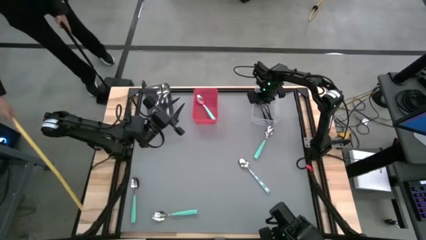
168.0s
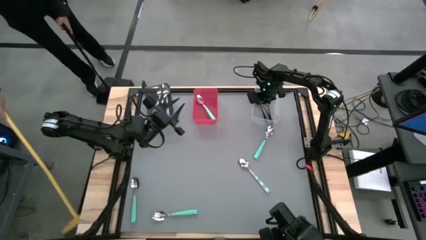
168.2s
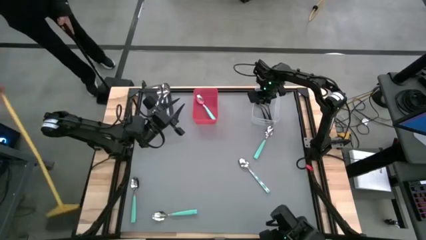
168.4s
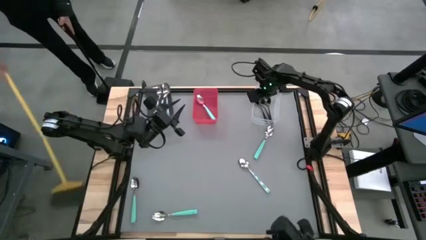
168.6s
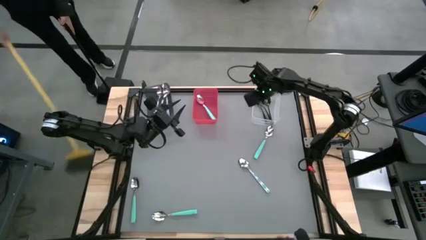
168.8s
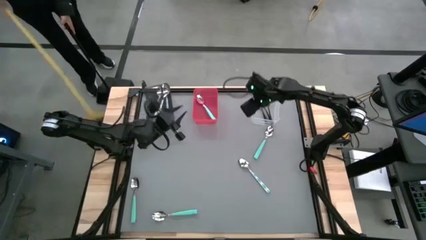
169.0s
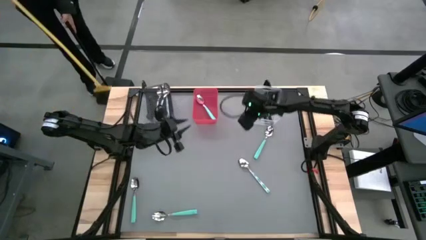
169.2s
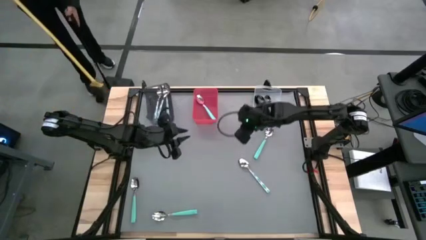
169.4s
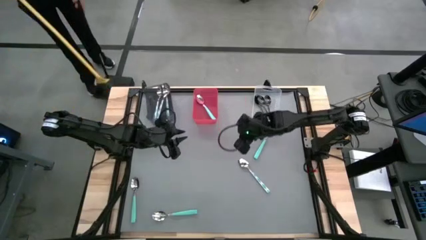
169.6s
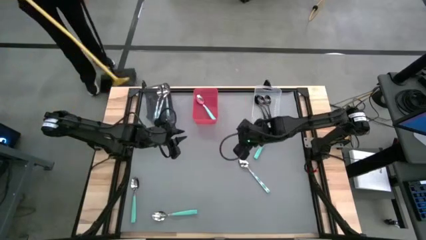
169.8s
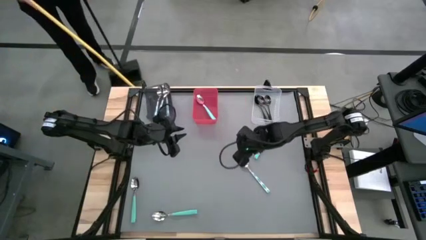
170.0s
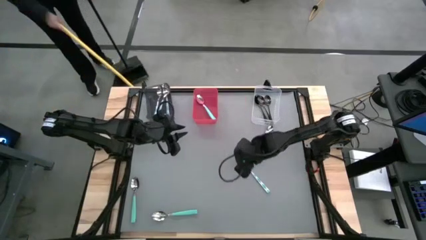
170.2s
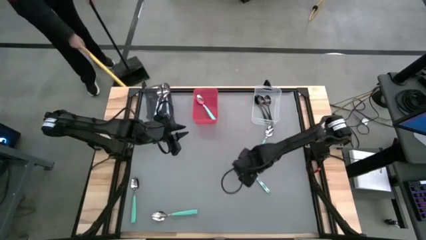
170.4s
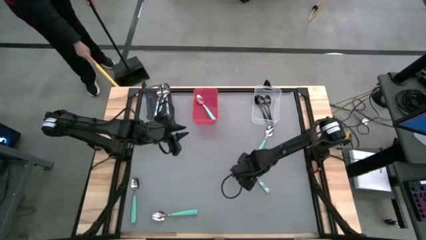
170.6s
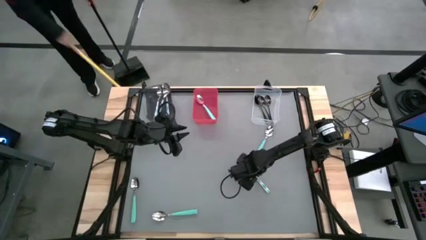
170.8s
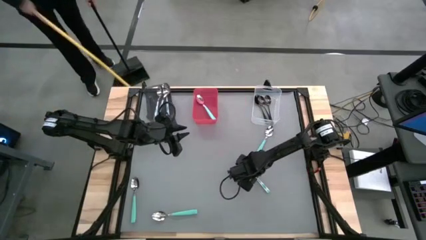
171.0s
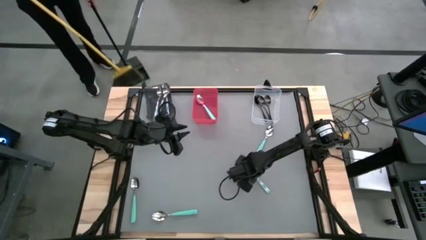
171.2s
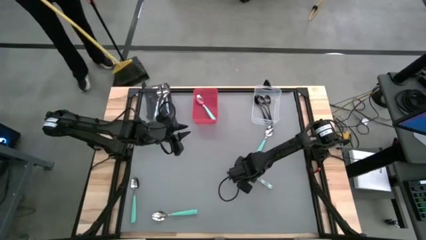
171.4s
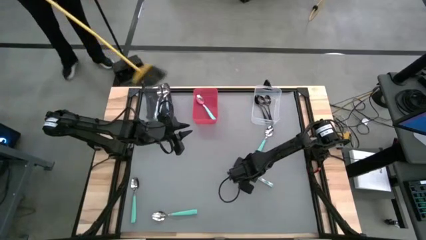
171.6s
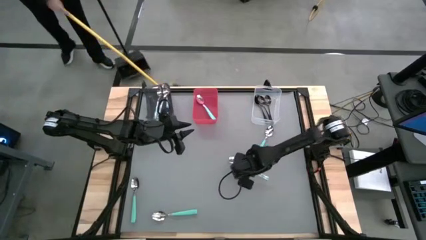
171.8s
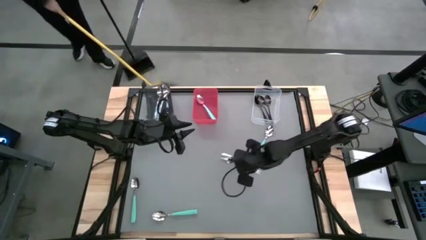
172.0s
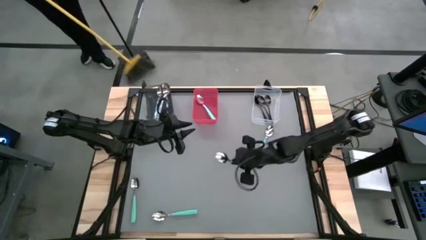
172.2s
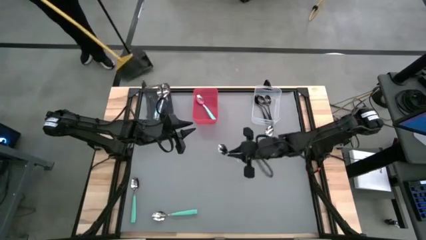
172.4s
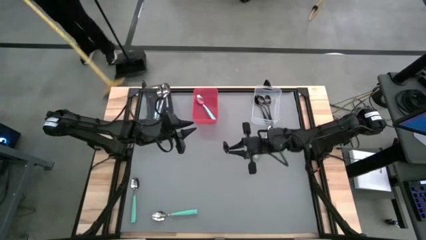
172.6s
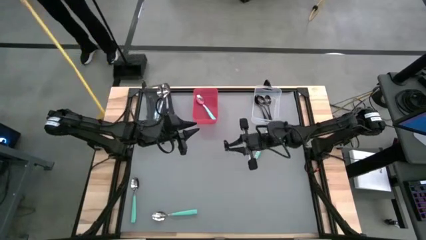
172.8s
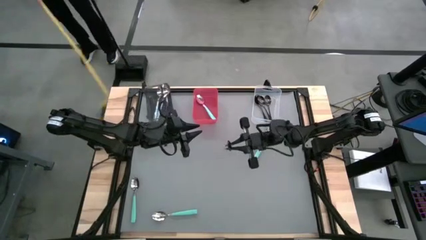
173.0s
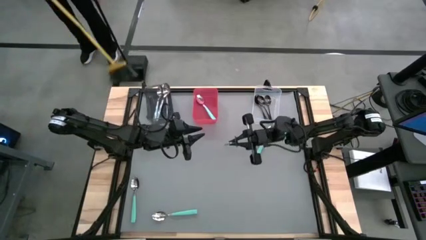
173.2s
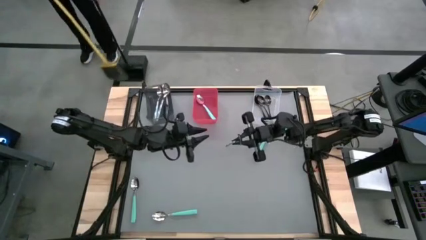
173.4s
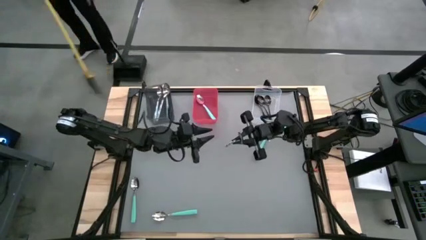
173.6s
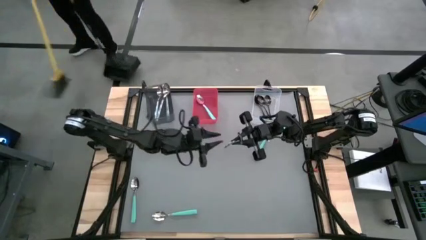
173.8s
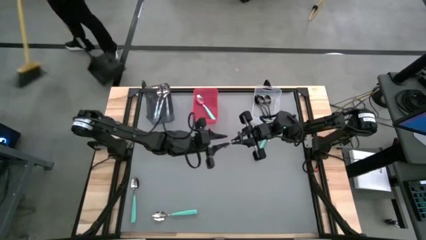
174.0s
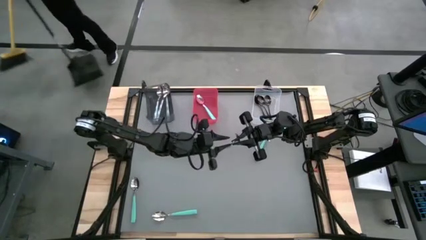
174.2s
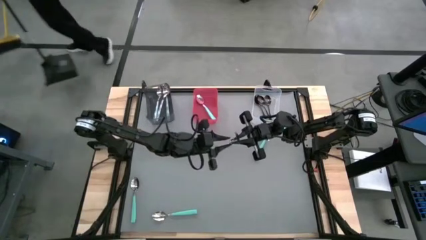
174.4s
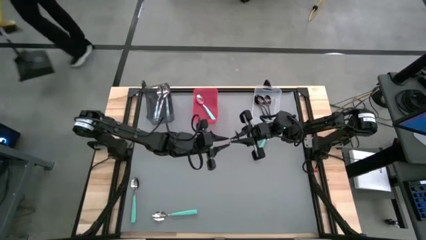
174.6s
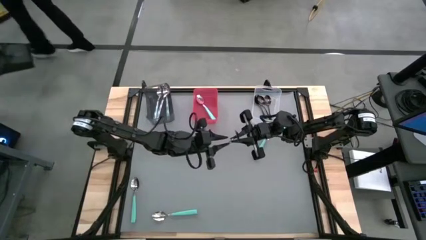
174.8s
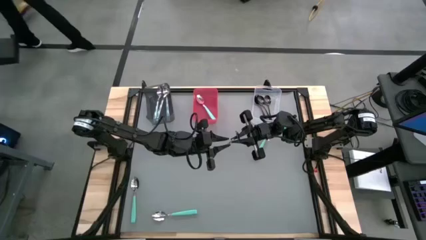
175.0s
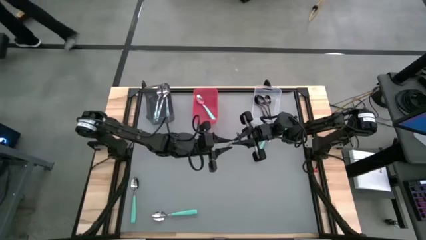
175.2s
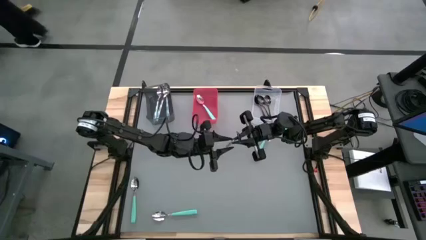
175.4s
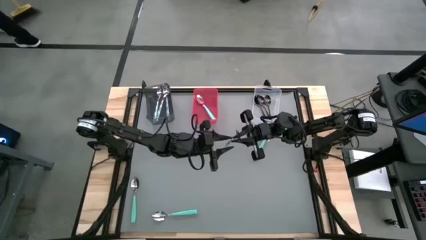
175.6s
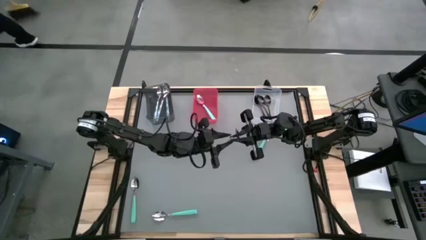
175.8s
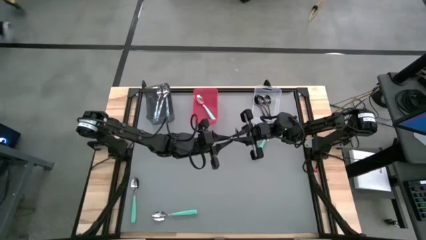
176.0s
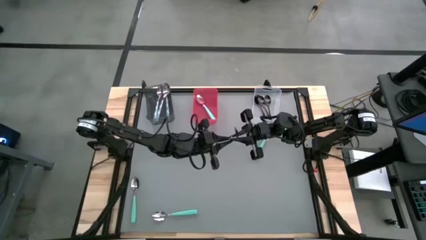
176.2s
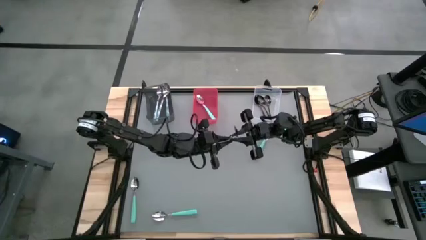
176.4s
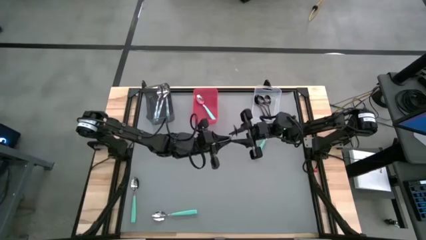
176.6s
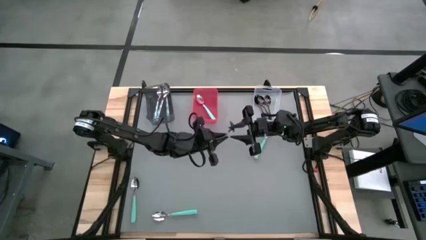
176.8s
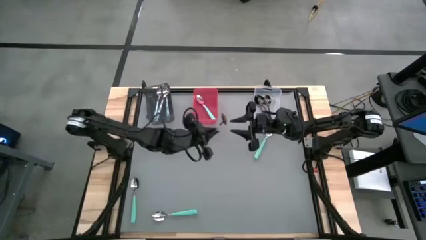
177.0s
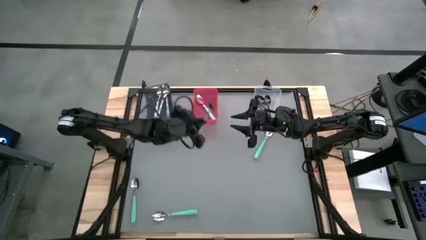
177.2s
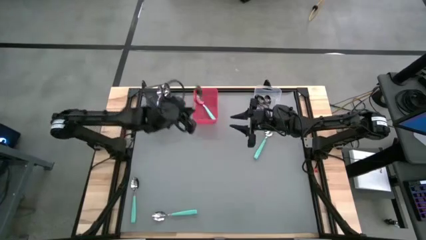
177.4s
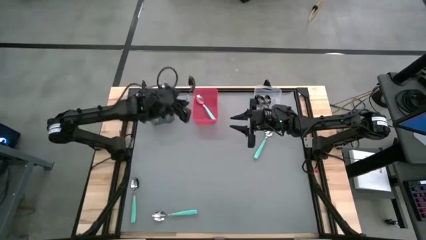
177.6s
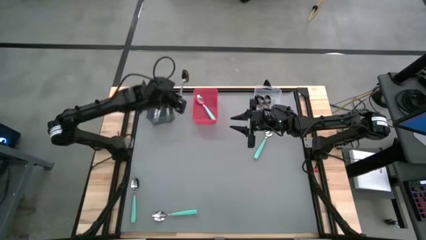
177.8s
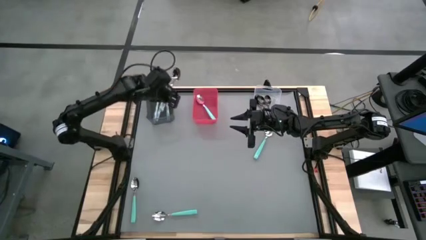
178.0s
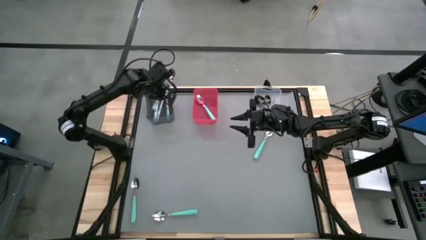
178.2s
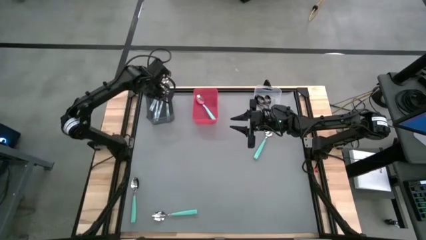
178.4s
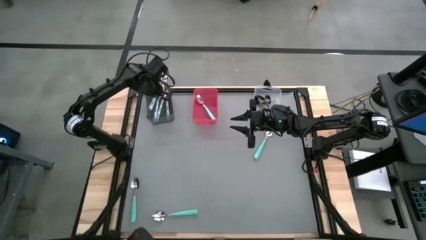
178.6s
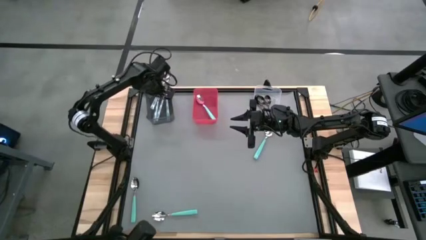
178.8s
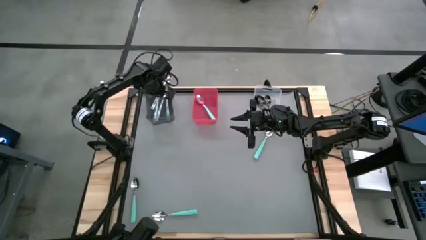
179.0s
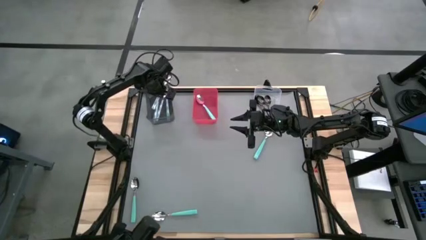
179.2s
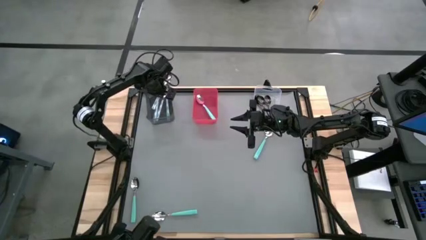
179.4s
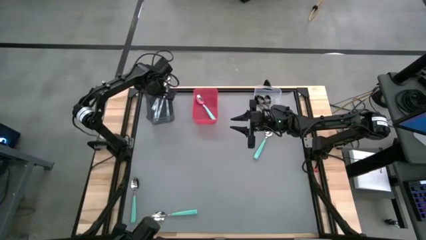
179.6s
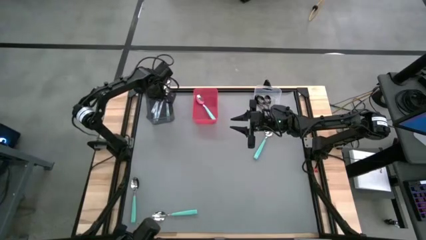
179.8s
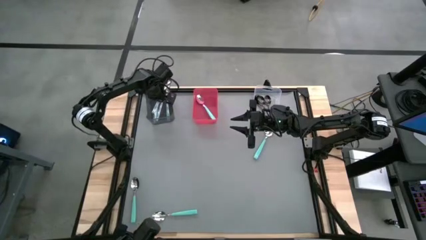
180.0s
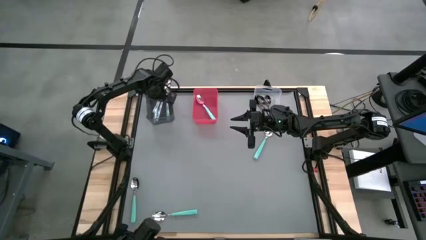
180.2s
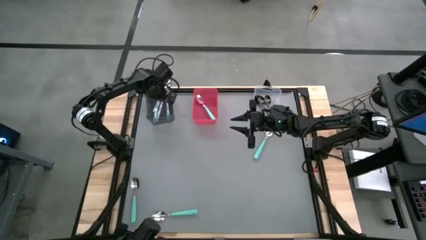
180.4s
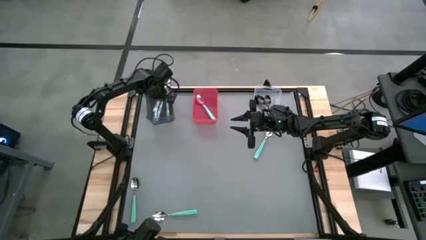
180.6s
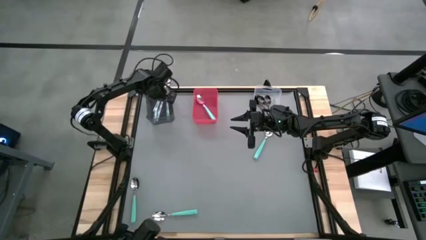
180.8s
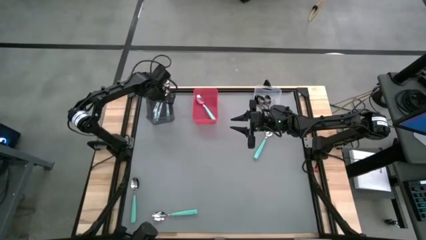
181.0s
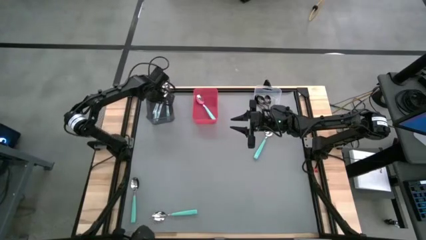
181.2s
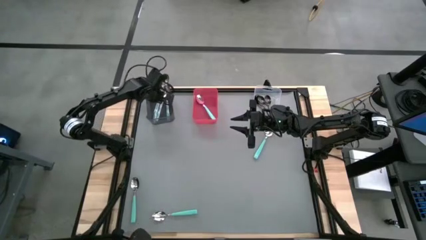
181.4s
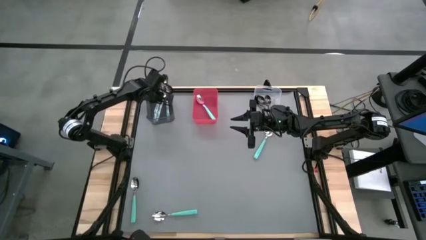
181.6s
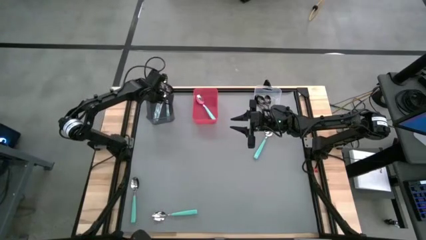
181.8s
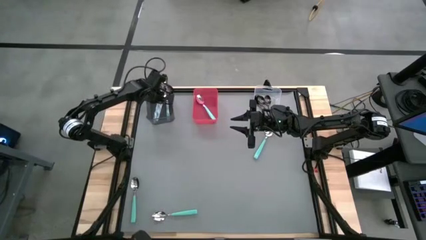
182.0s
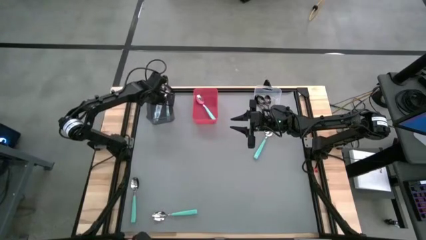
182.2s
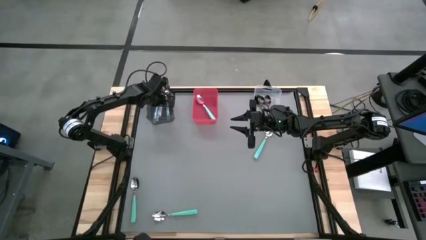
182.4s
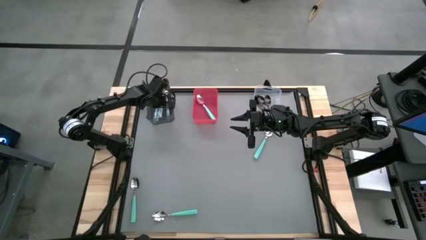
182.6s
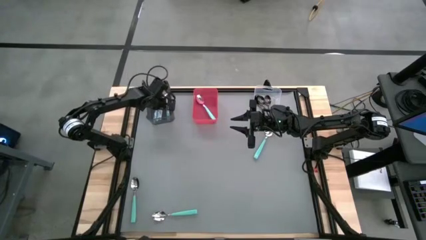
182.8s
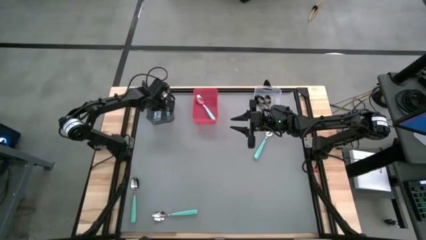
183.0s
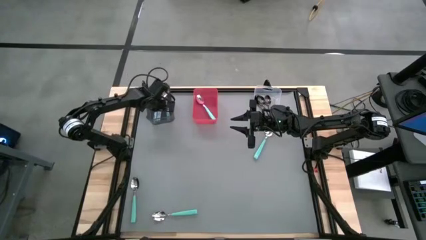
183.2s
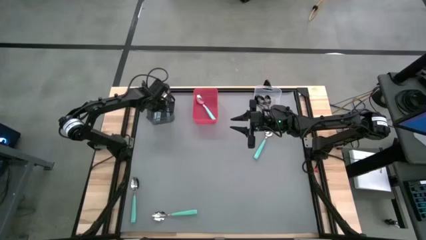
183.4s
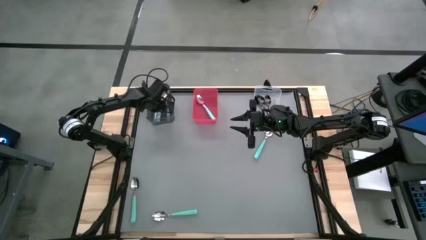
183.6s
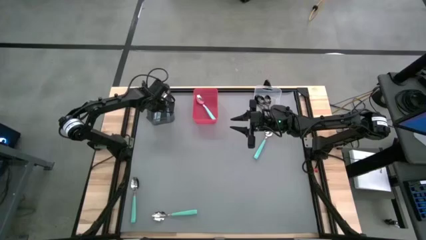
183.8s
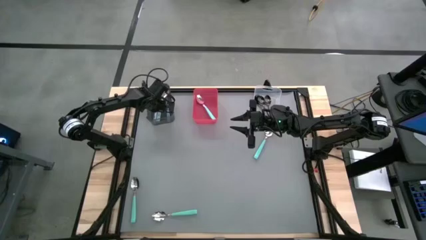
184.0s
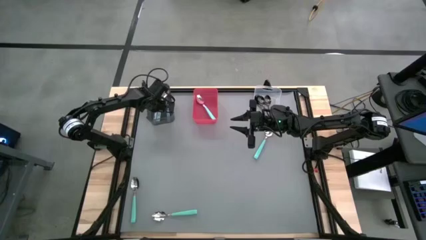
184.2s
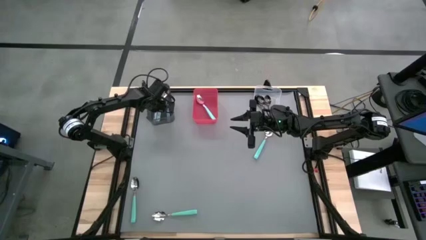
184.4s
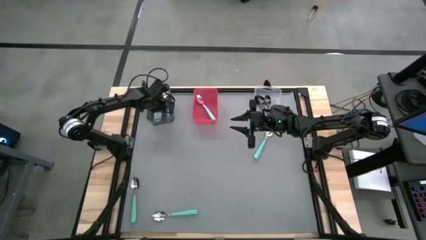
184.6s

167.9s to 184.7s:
Task: Sort silverware by color (type)
Put the blue patterned spoon into the black bin
